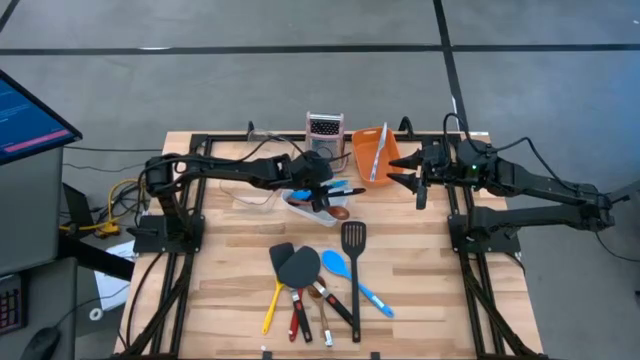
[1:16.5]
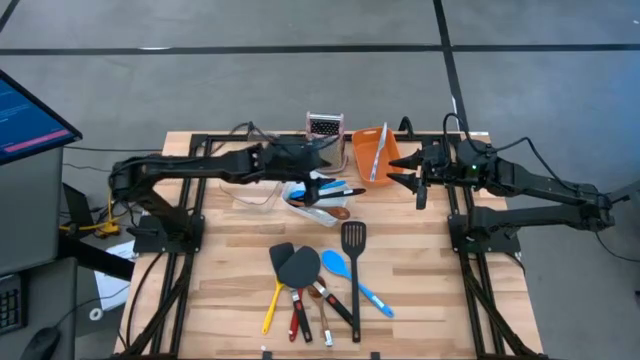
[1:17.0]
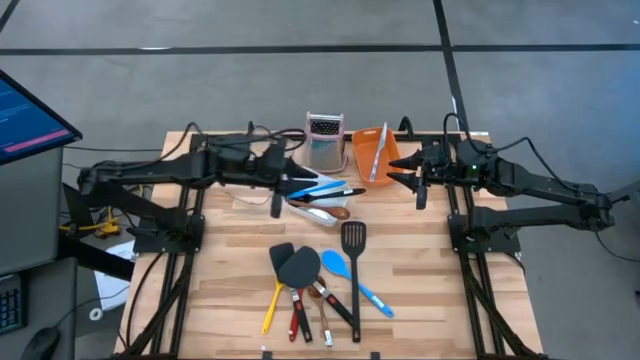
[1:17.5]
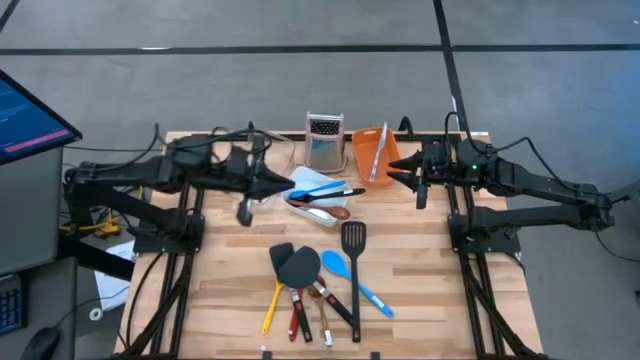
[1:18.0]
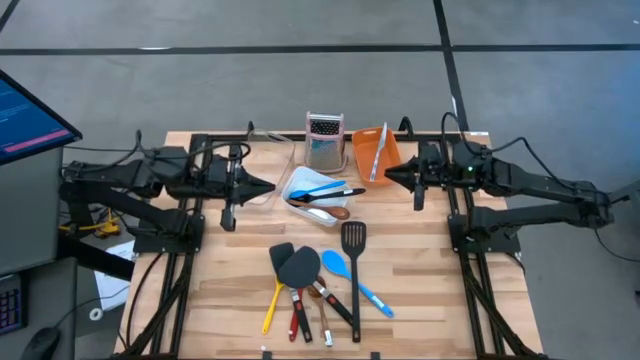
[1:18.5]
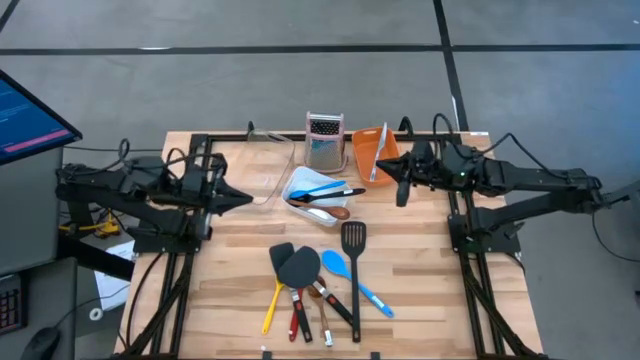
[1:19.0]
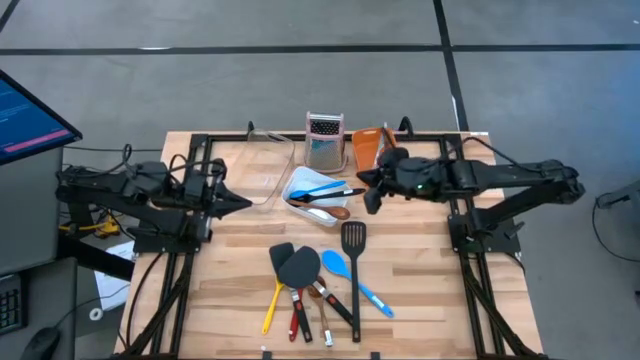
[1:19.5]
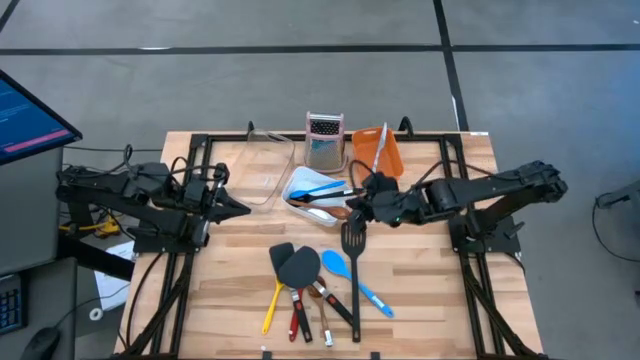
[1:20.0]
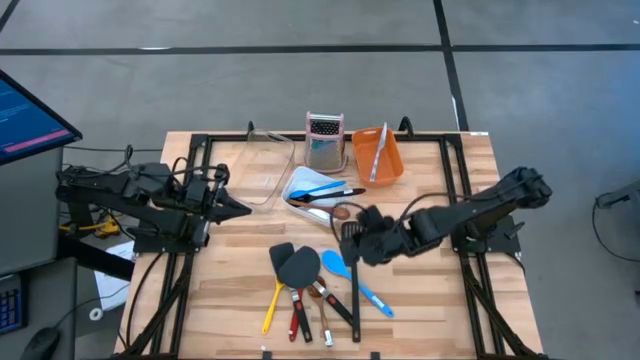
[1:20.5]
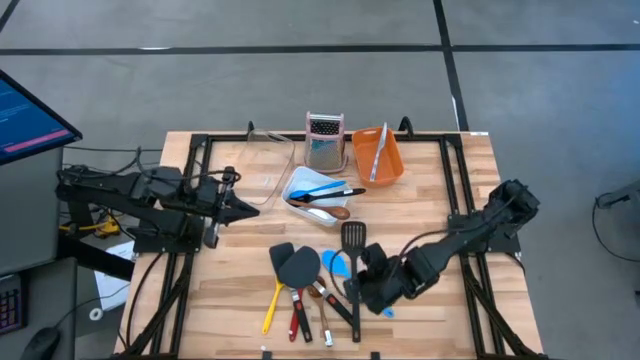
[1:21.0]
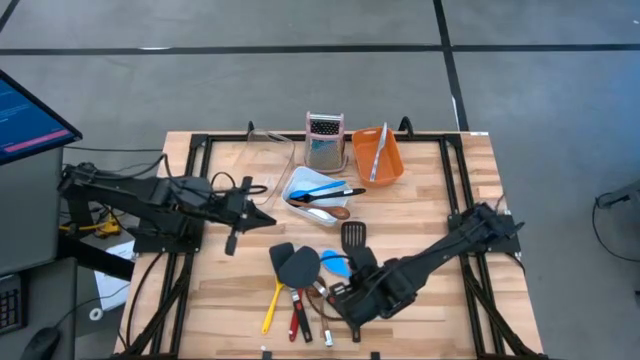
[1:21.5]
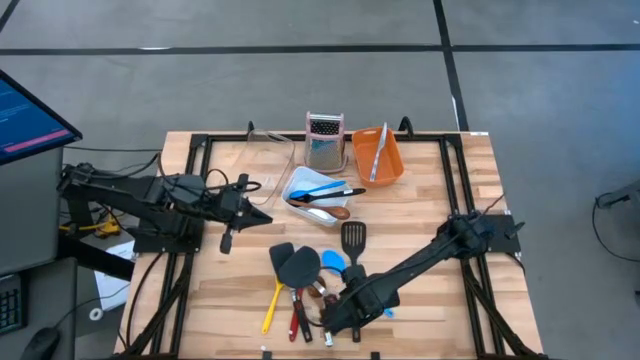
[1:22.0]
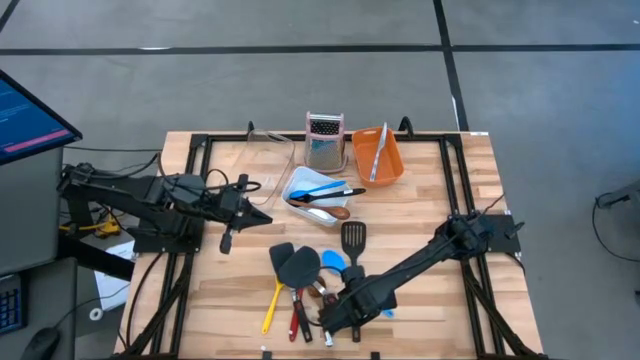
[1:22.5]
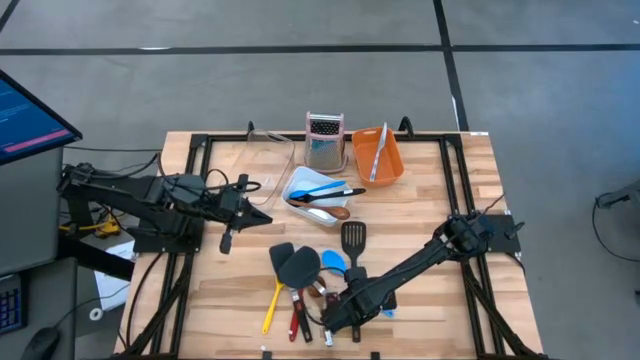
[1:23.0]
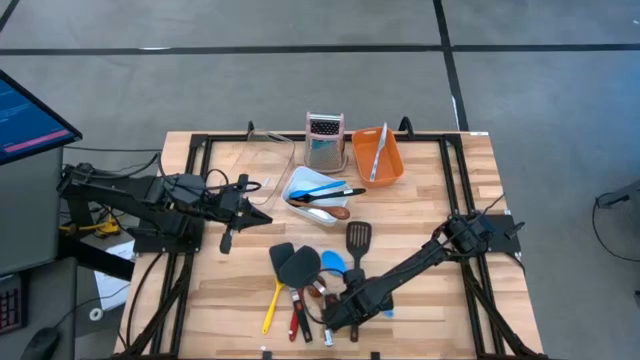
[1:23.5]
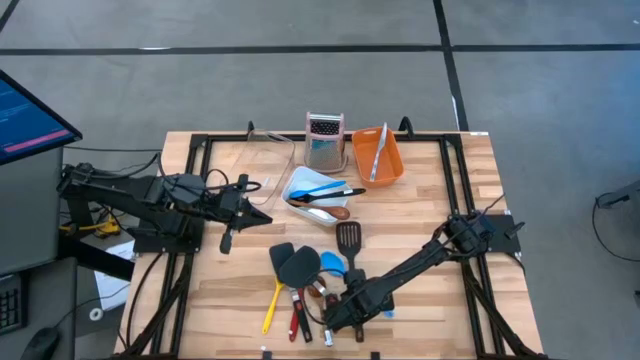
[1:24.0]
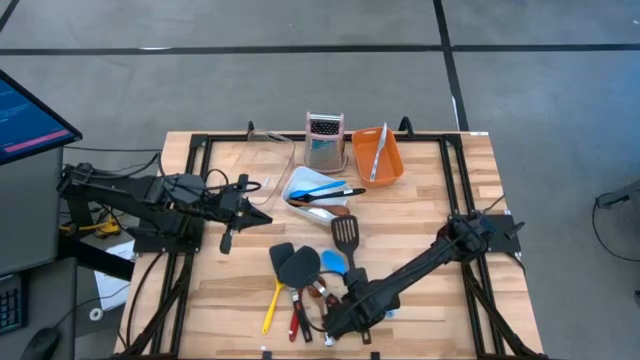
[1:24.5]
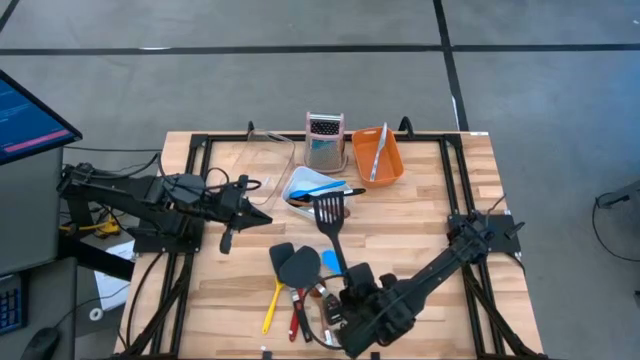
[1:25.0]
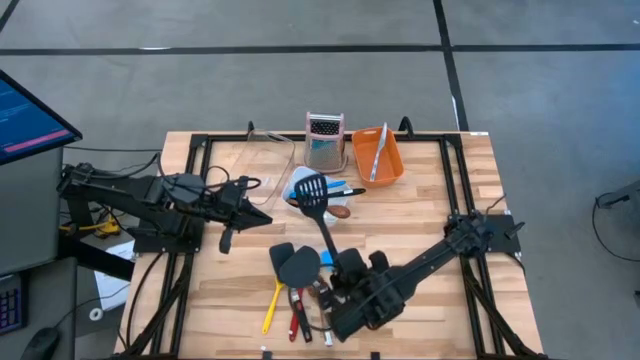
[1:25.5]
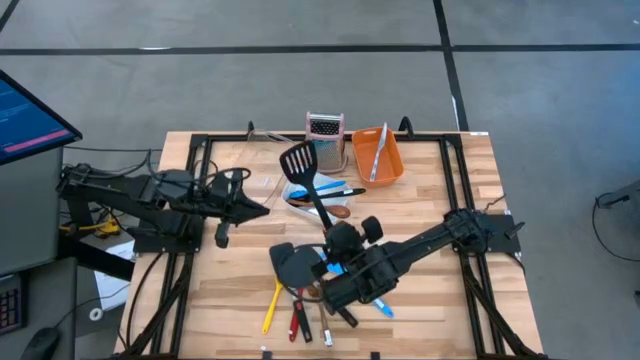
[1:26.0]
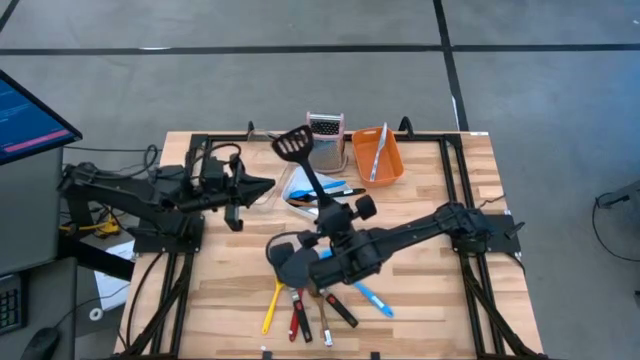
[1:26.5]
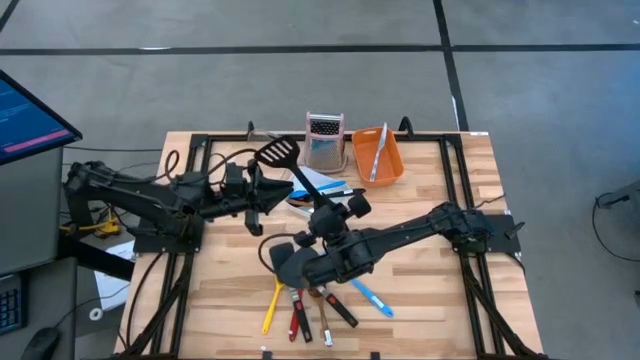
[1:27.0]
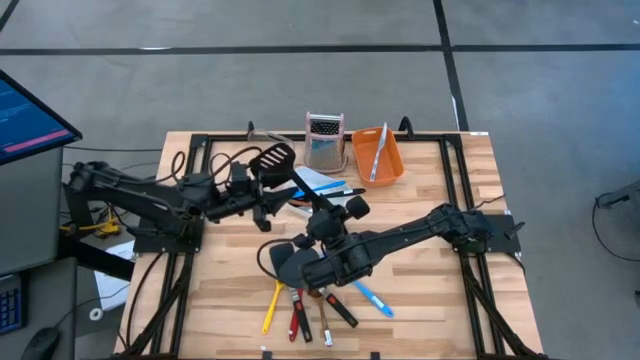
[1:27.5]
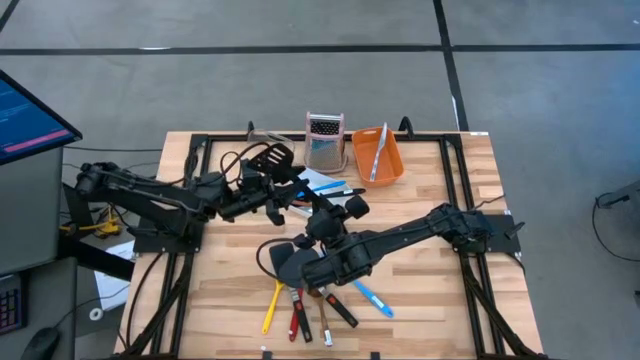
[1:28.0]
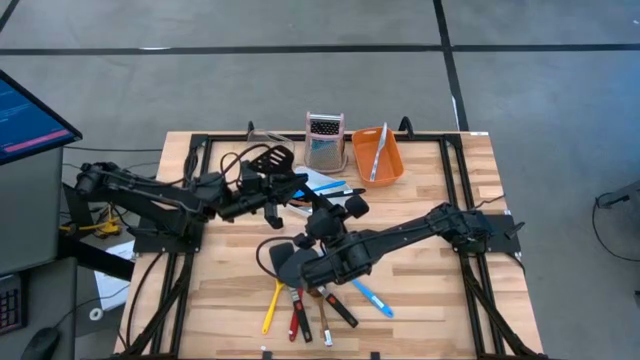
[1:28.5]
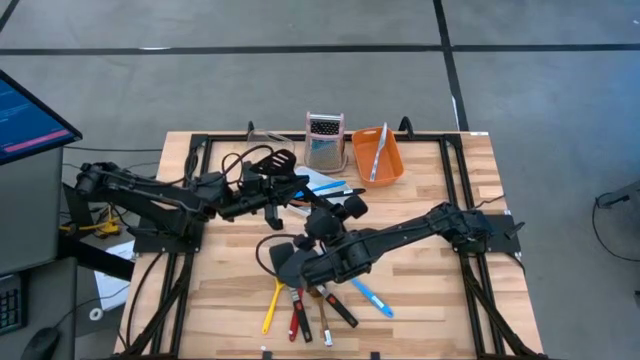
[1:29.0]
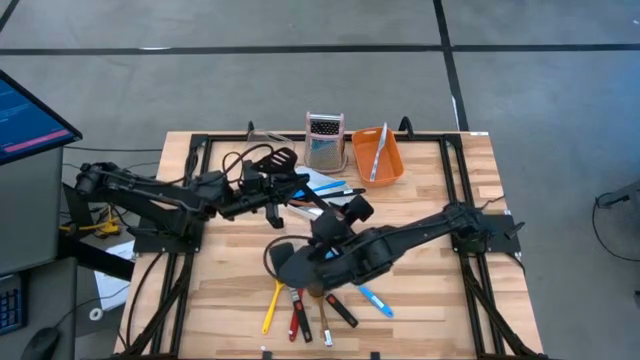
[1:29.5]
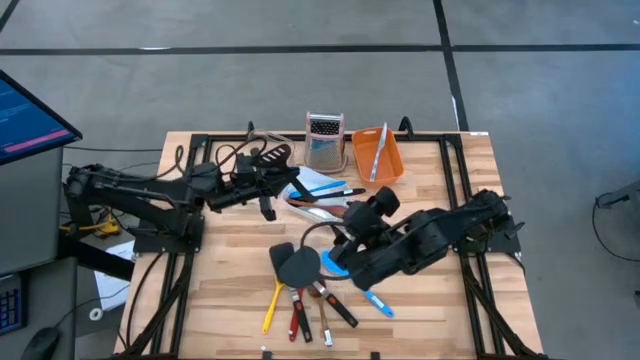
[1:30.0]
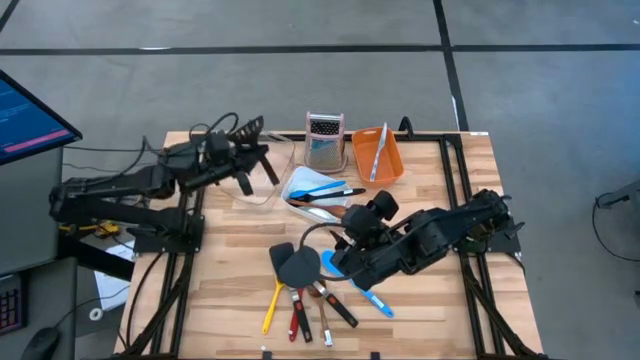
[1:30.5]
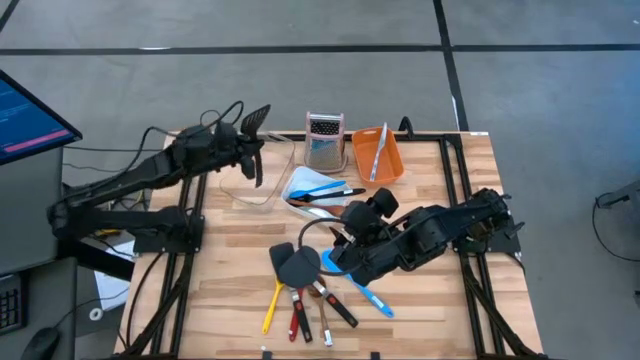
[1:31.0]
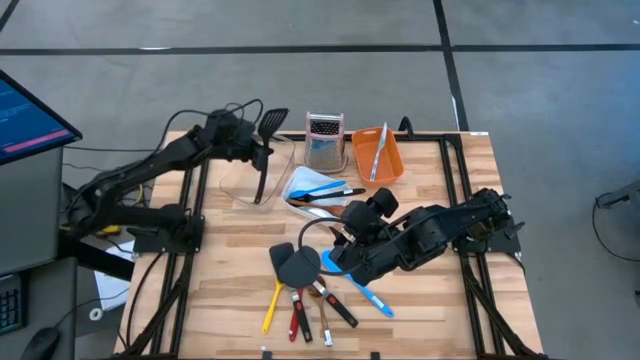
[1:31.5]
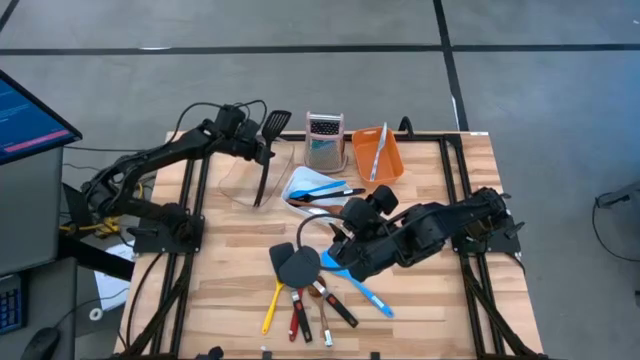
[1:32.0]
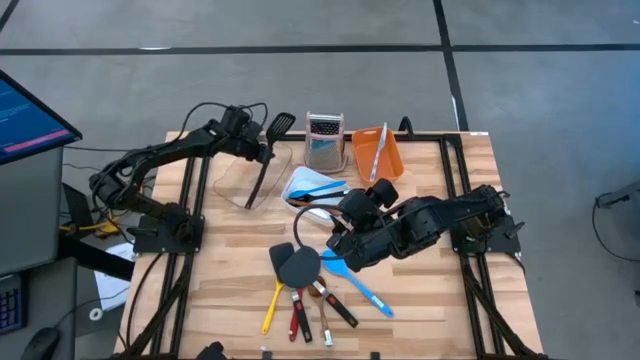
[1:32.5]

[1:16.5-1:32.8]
Task: Pick & Place Kitchen Items
Put the black slotted spatula into the transparent bin

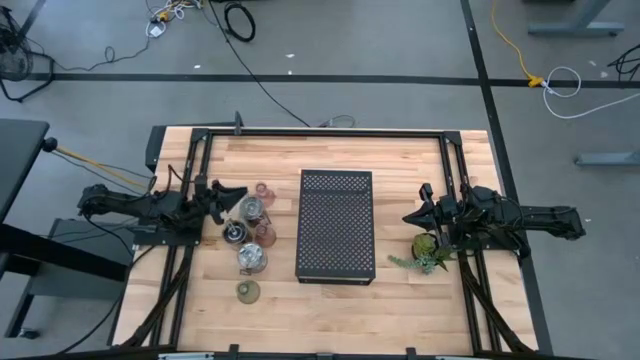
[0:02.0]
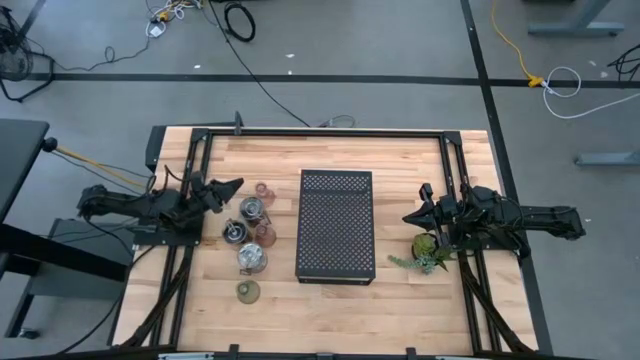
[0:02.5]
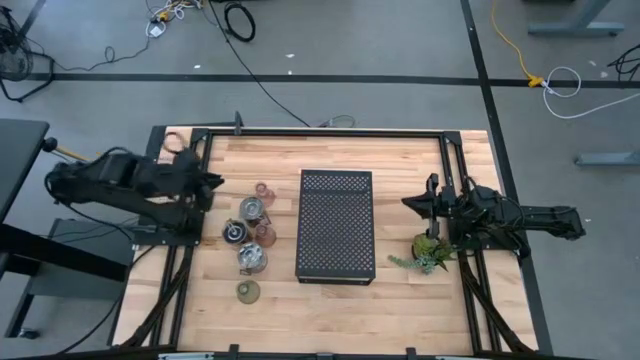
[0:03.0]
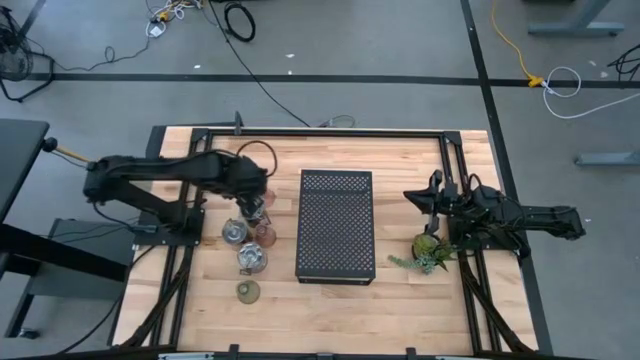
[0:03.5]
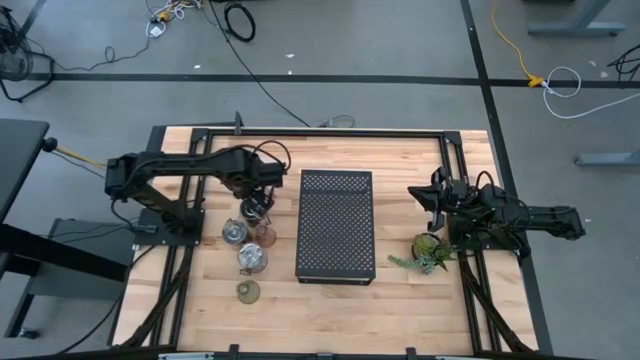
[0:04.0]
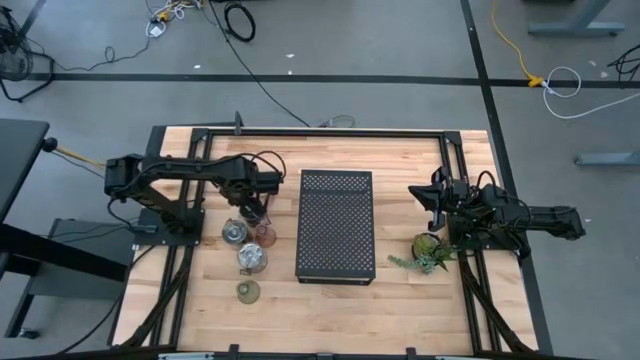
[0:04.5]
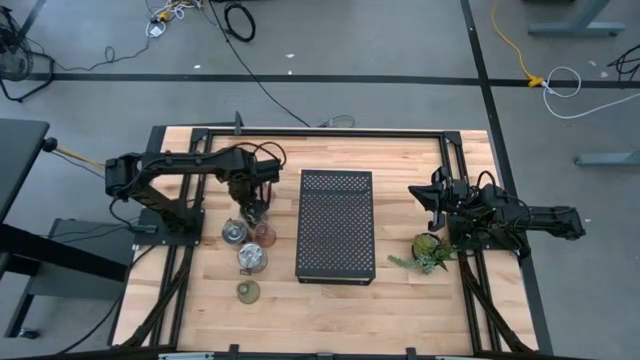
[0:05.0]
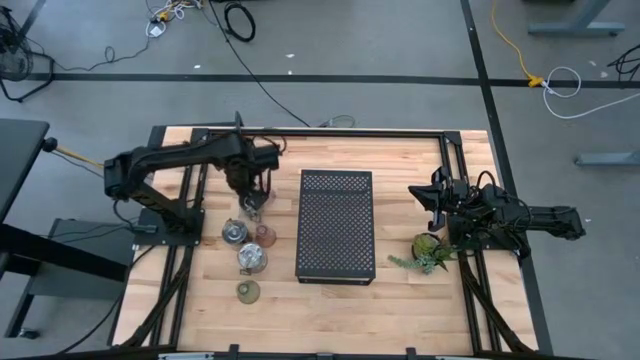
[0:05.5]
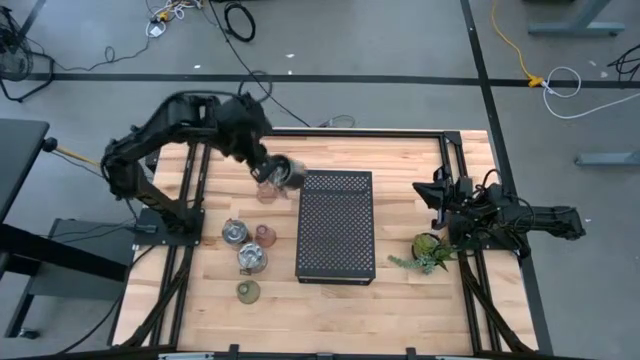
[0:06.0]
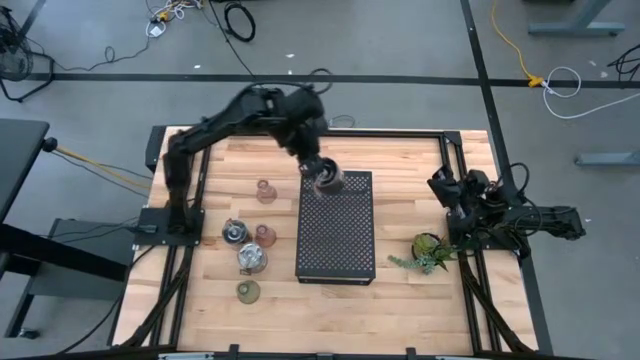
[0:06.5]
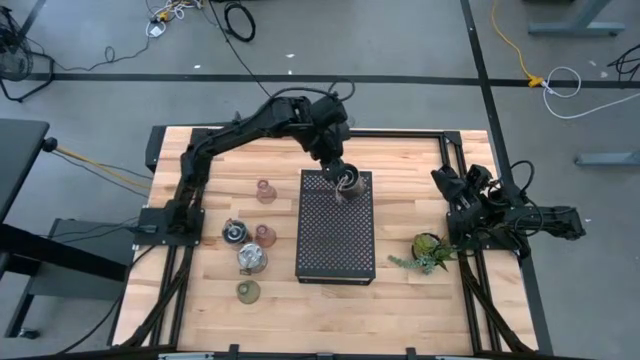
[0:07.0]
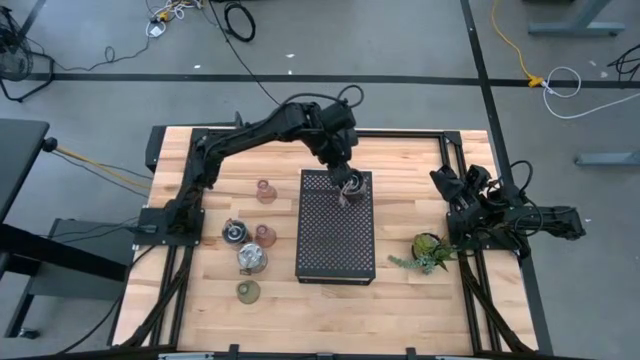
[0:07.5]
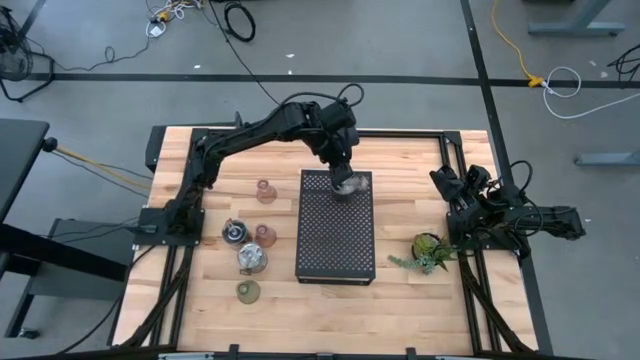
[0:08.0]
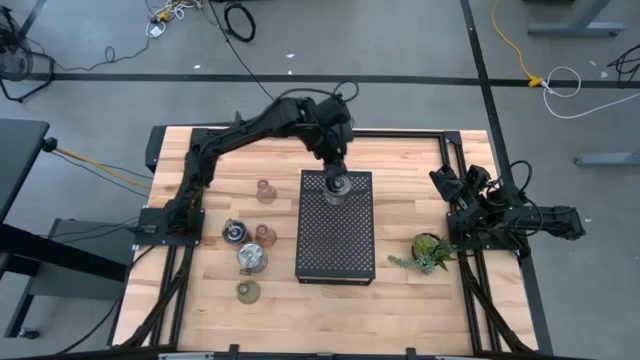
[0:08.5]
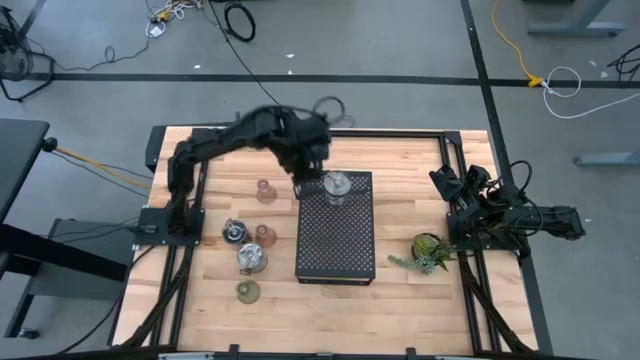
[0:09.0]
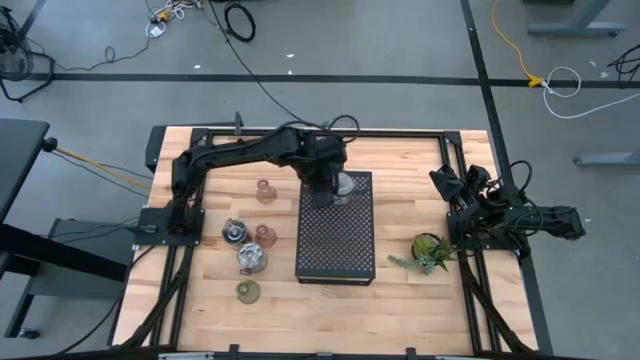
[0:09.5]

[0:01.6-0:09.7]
Task: Pick & Place candle stick holders
Put the top silver scented candle on the shelf
